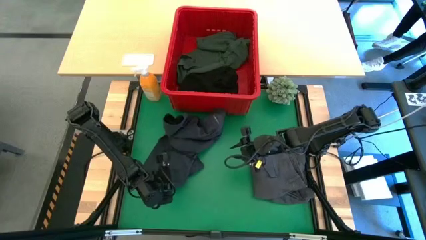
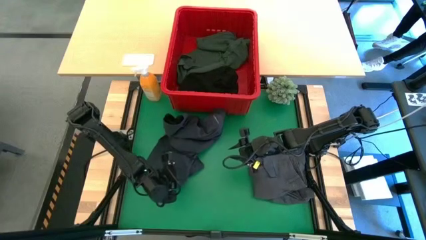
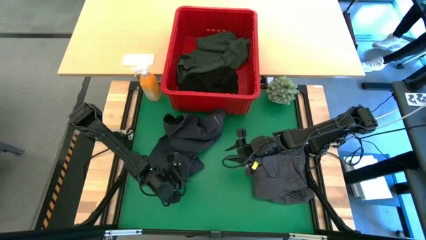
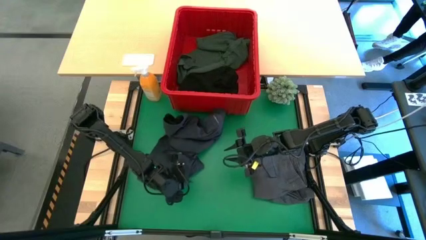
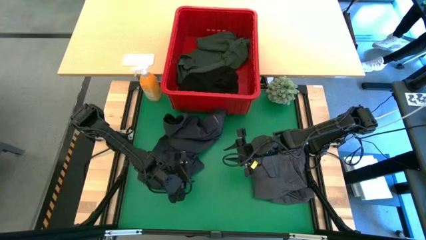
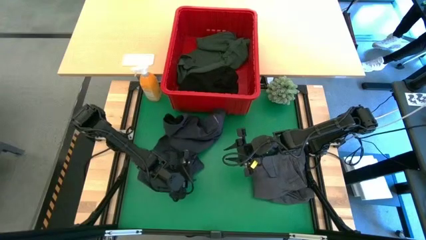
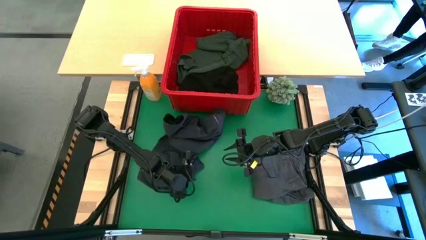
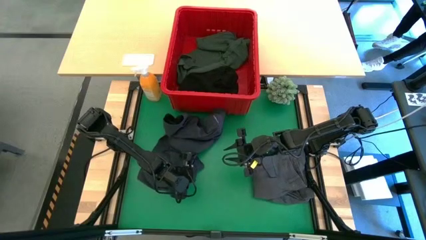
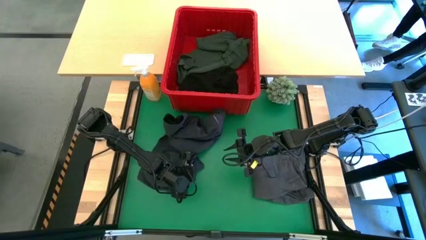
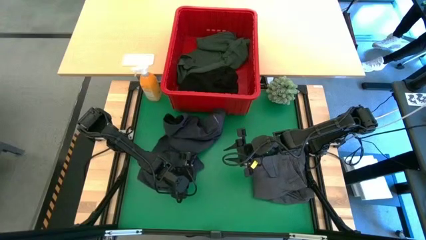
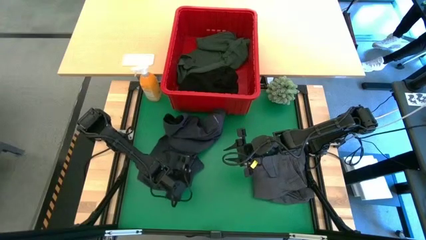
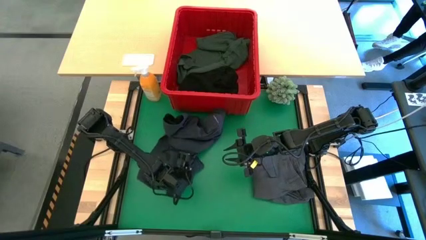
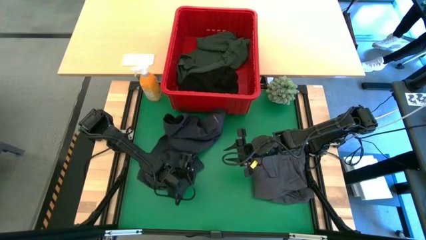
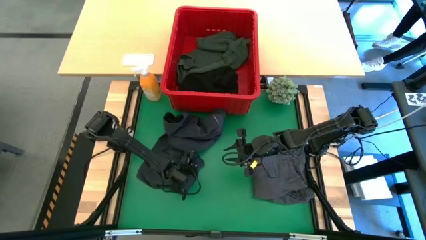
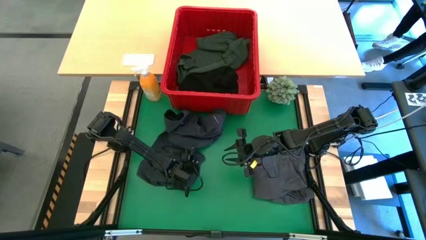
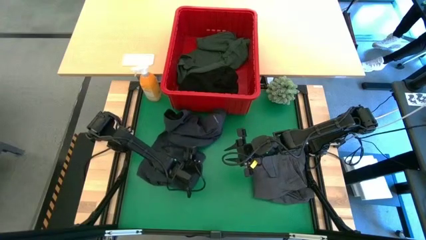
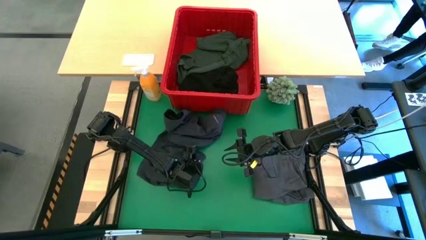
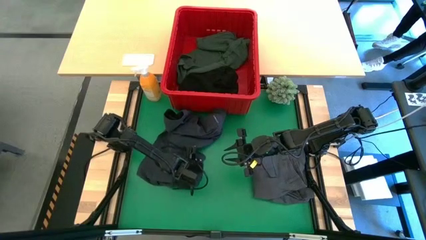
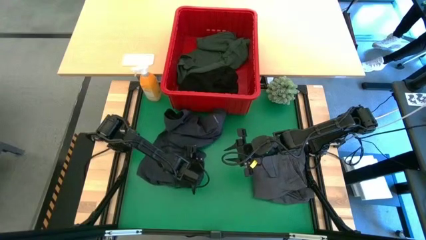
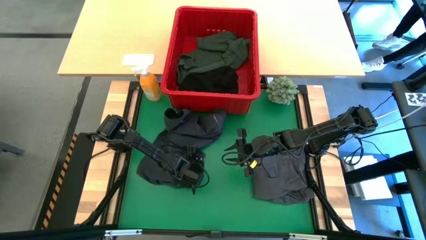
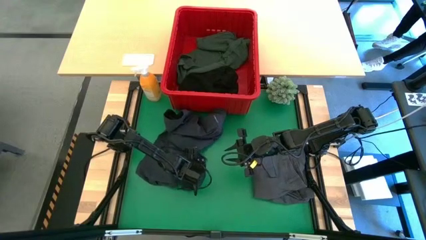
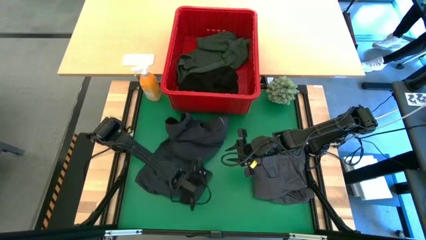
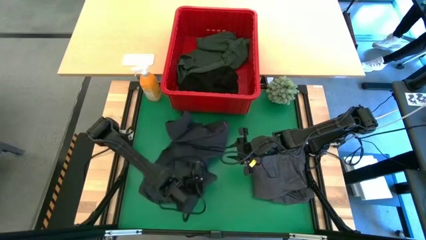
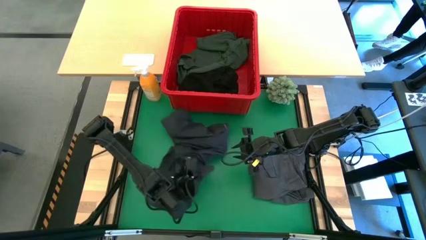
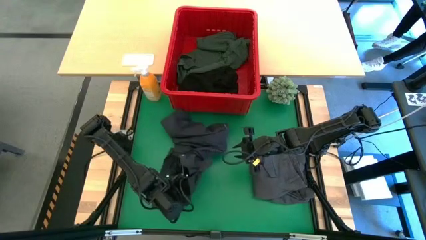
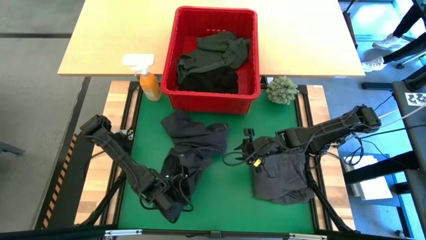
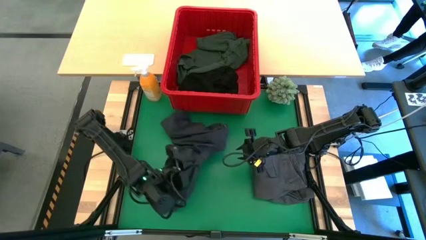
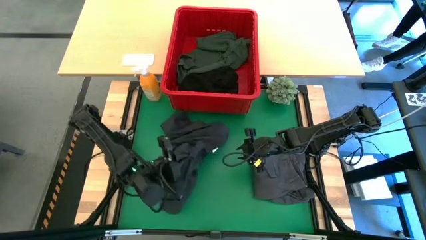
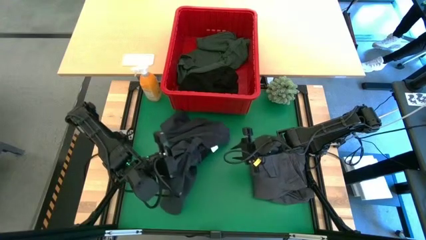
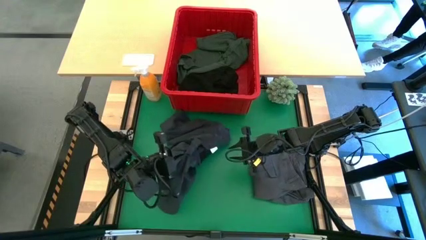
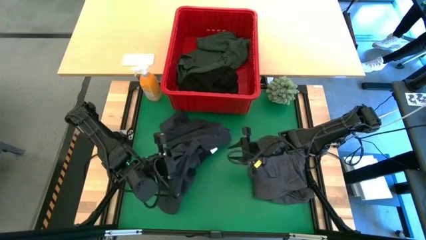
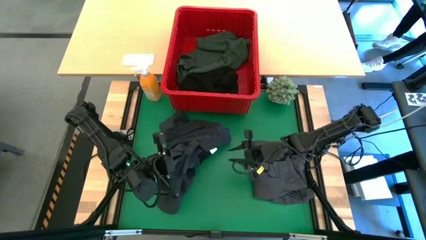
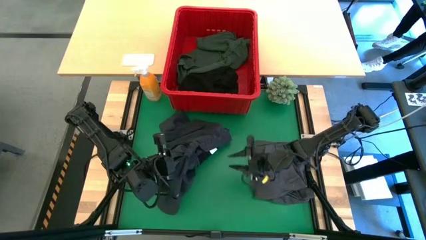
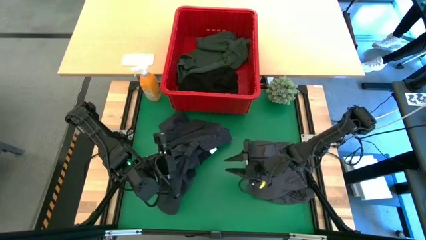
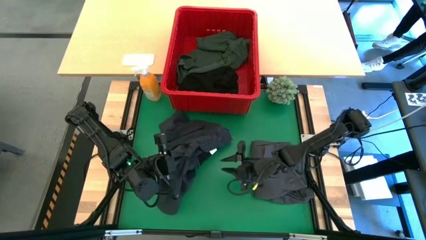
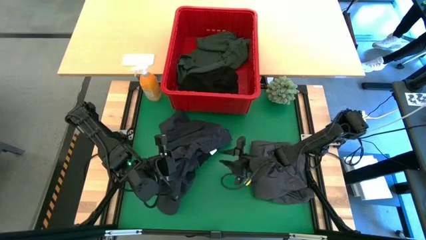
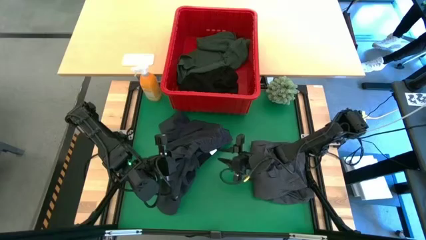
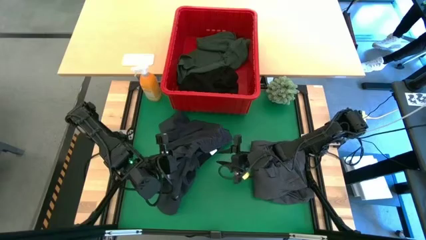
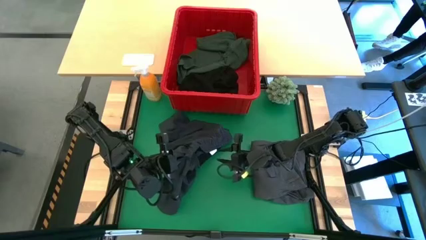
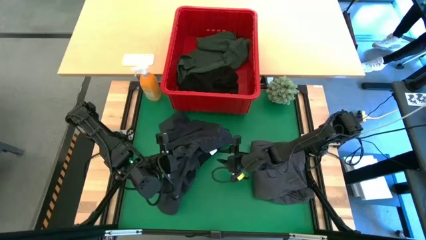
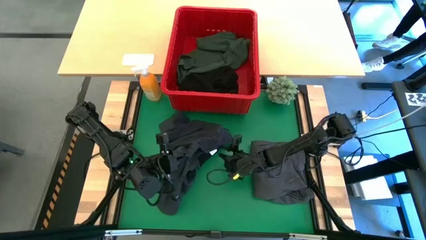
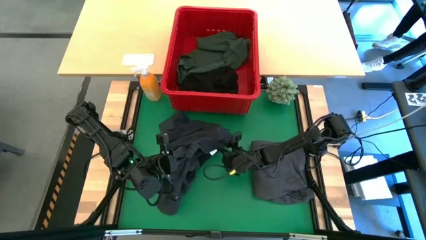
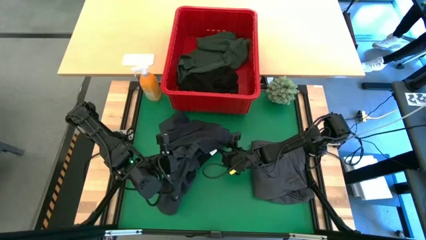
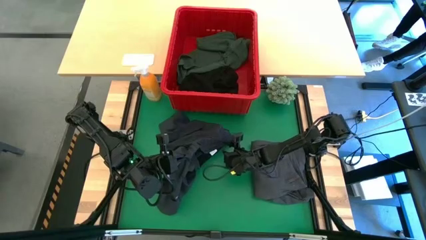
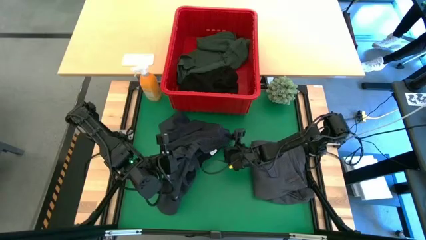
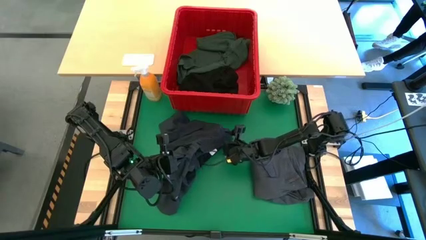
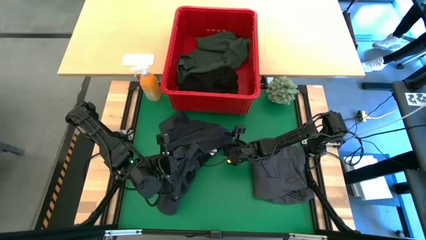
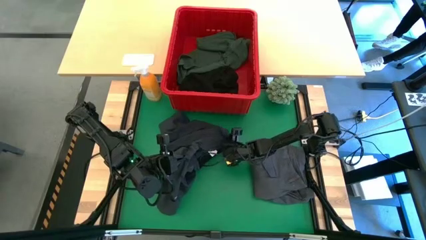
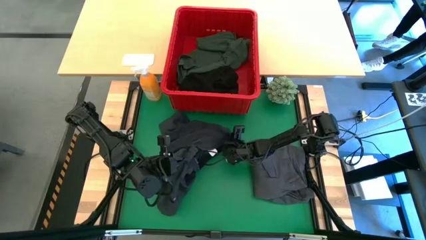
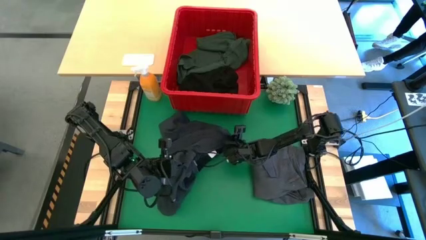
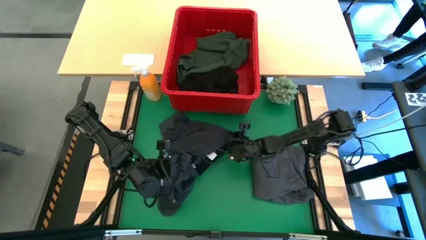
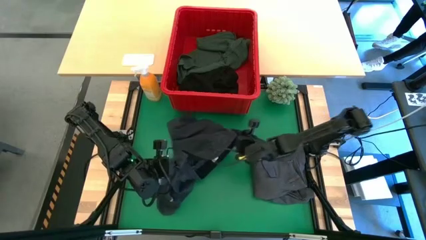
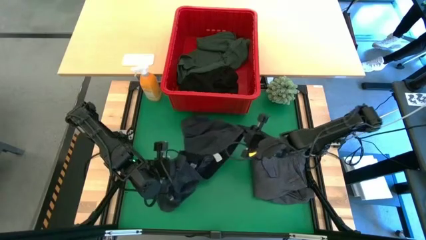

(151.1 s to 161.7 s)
Task: Fold Laundry from Bin
Fold the dark gray short

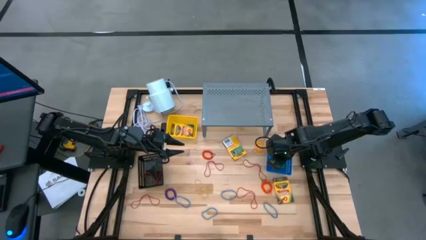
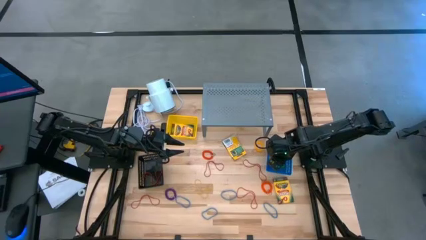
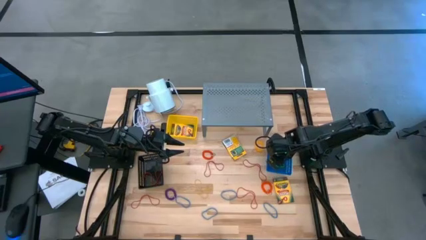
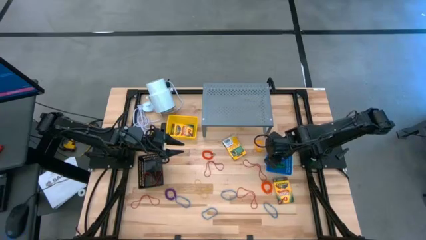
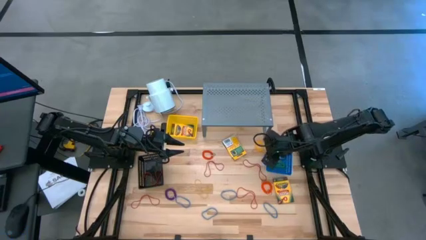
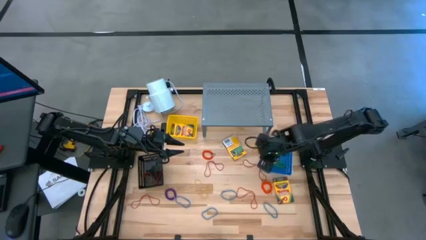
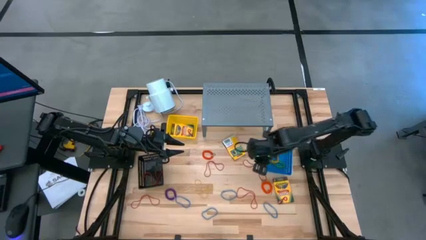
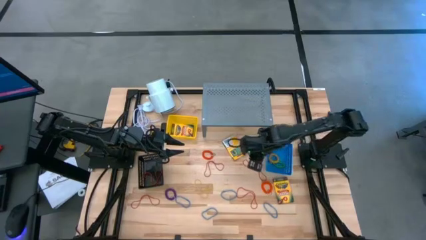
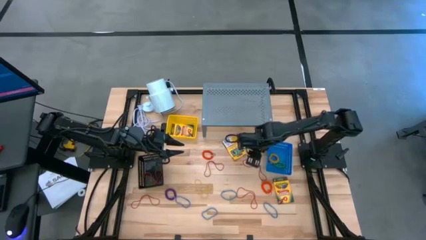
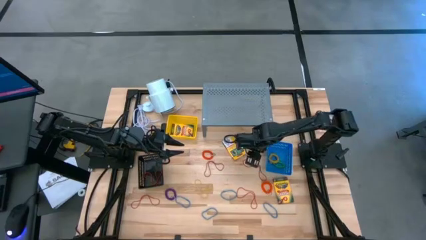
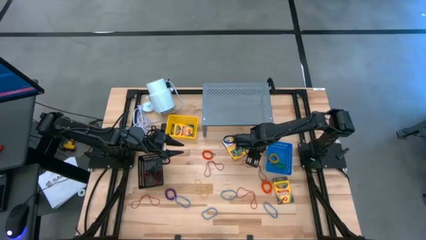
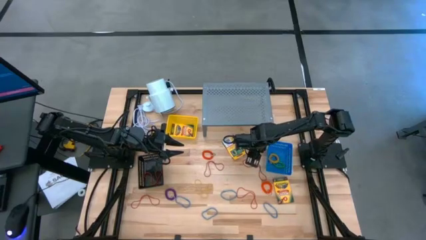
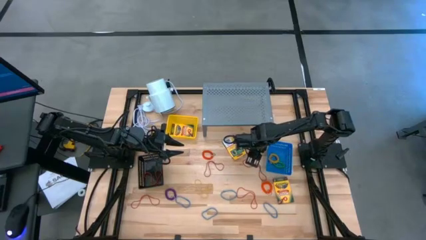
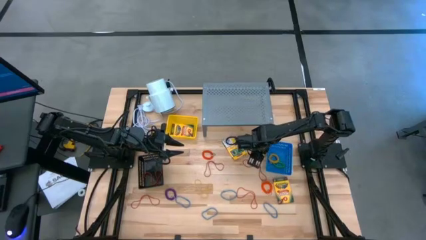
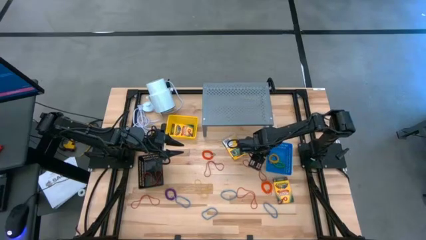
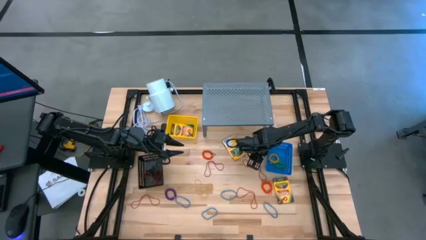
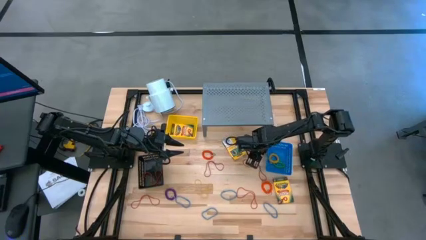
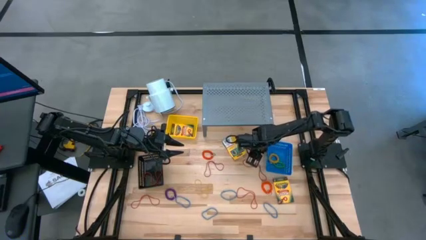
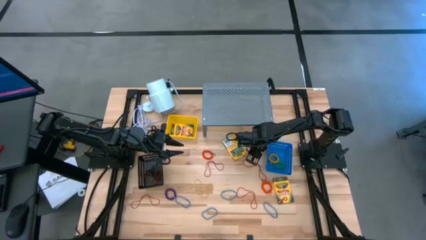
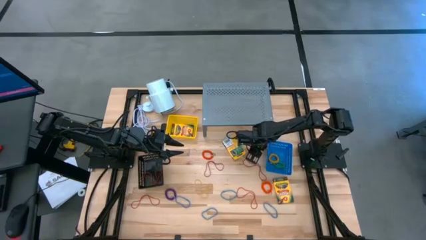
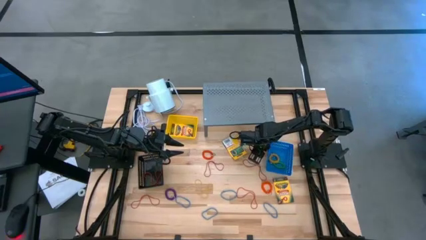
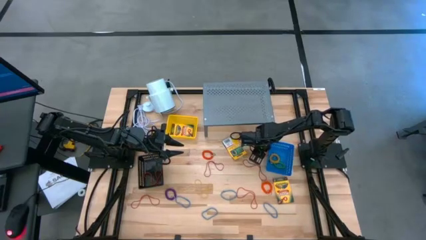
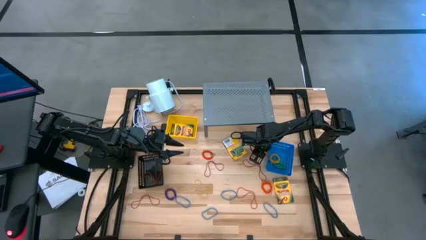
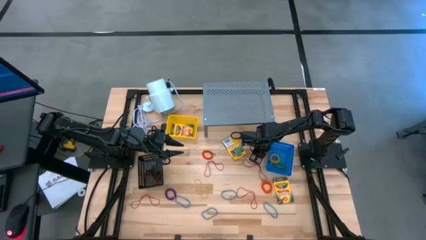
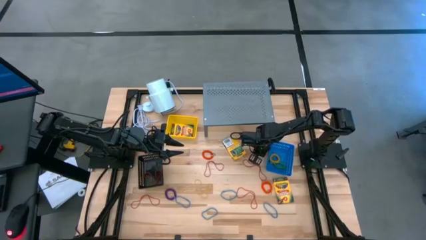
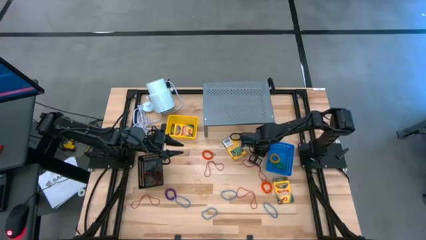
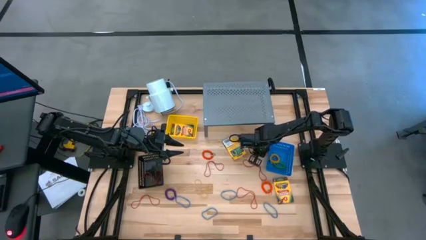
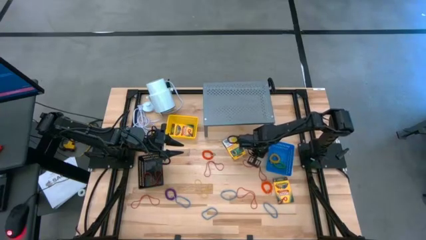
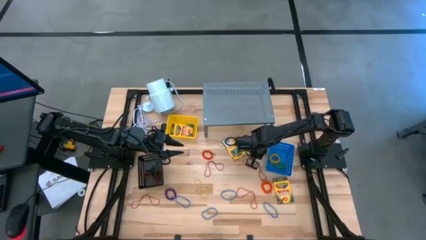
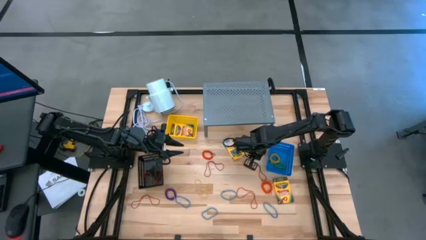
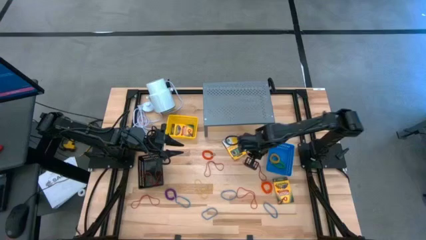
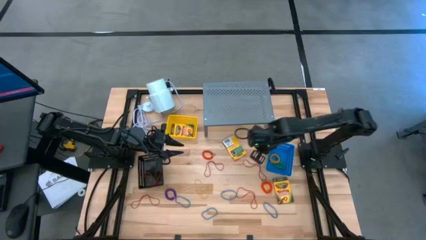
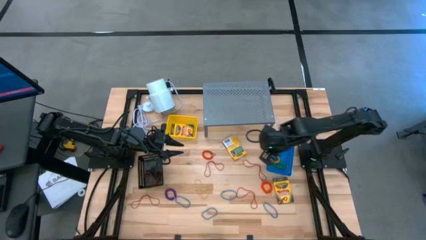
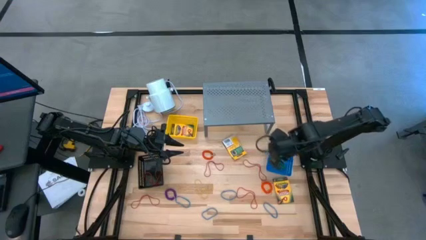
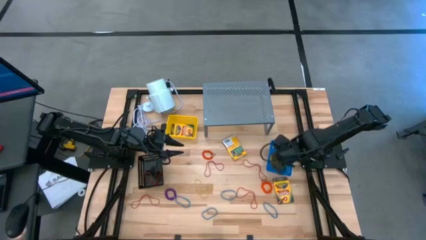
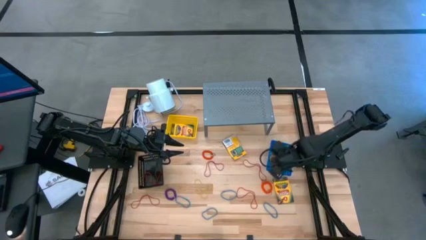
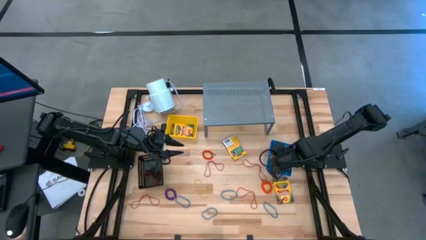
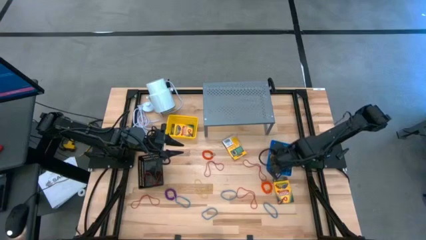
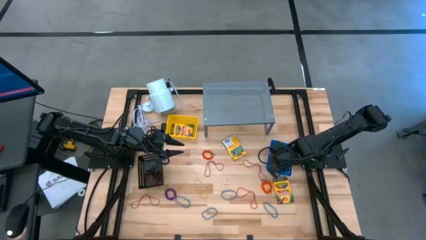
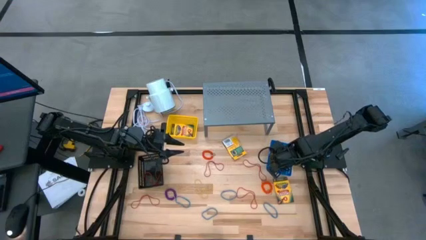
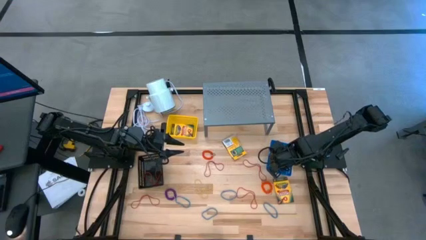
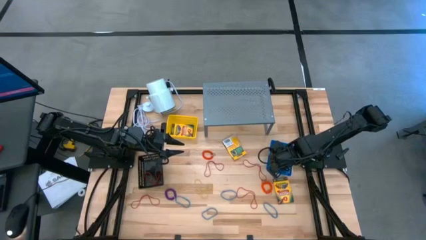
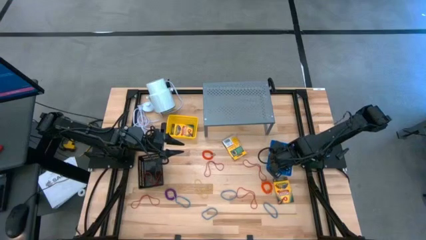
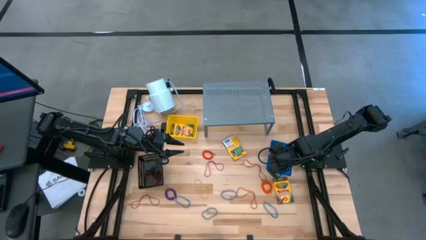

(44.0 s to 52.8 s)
Task: Pick & Place Office Desk Supplies
Put the yellow spring keychain into the blue bin
